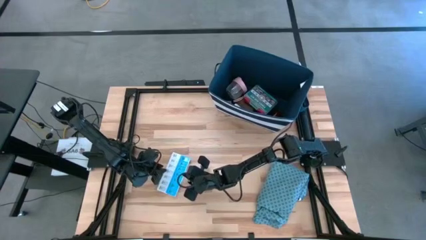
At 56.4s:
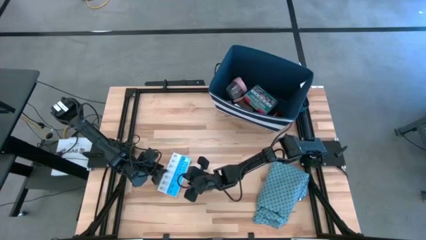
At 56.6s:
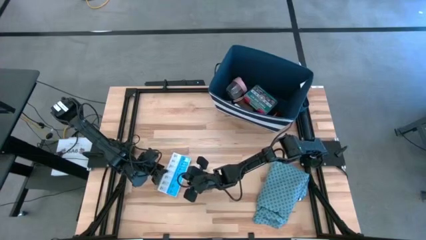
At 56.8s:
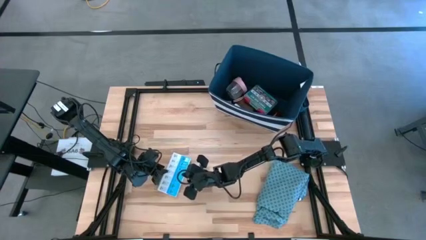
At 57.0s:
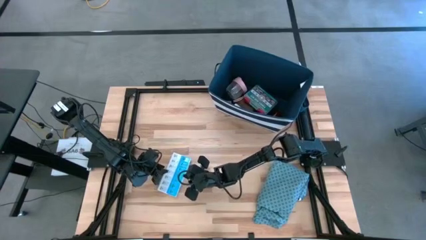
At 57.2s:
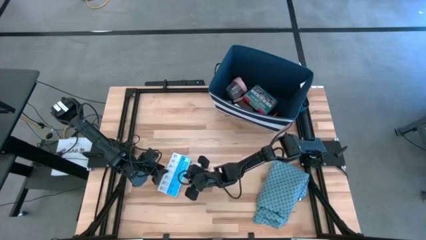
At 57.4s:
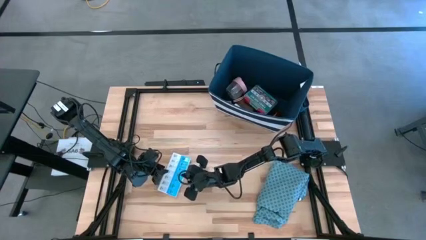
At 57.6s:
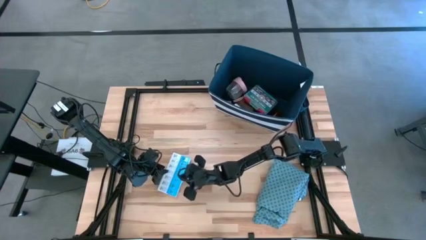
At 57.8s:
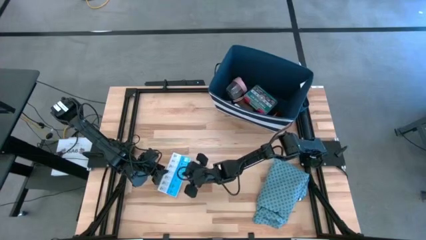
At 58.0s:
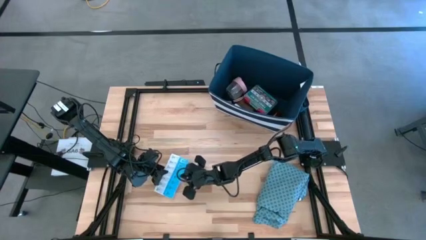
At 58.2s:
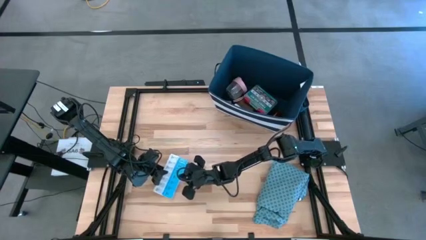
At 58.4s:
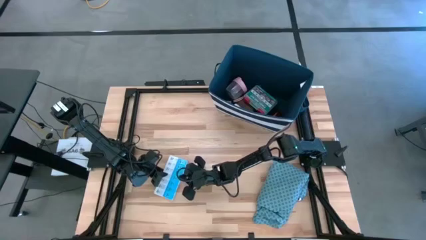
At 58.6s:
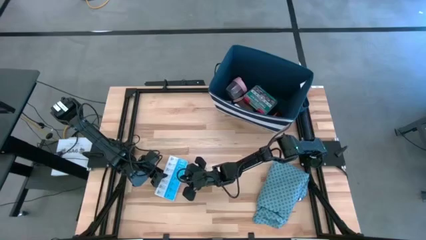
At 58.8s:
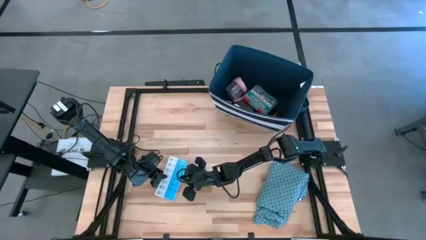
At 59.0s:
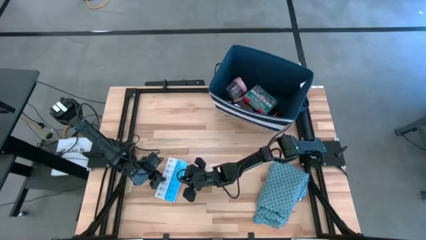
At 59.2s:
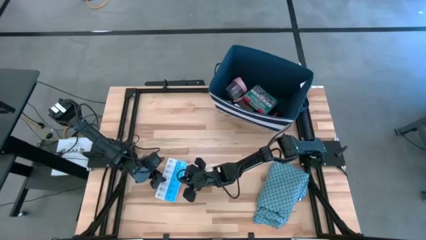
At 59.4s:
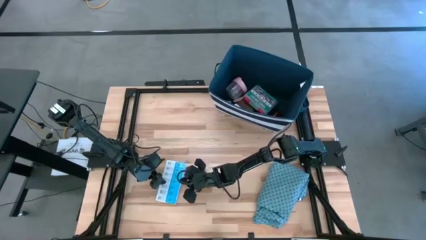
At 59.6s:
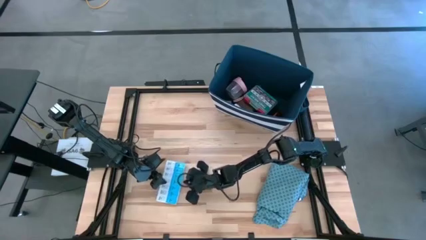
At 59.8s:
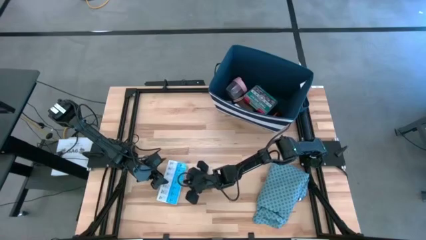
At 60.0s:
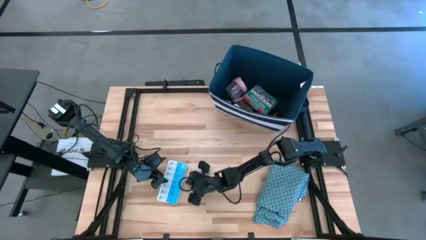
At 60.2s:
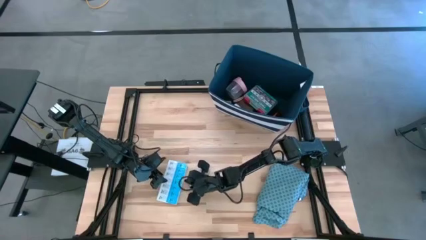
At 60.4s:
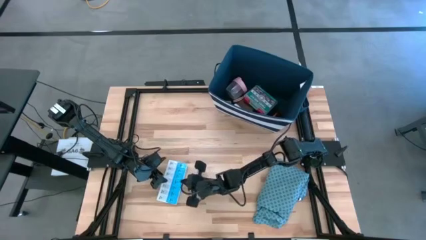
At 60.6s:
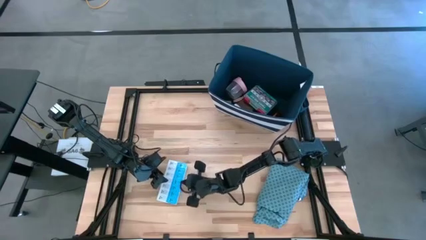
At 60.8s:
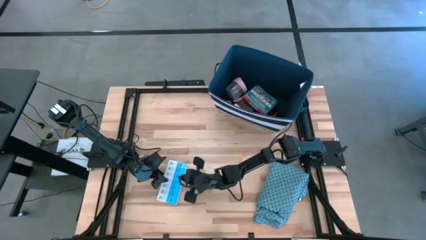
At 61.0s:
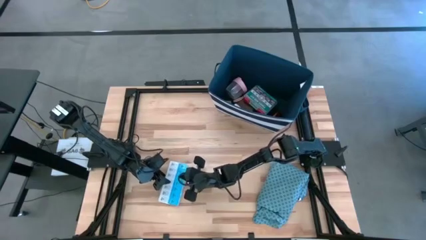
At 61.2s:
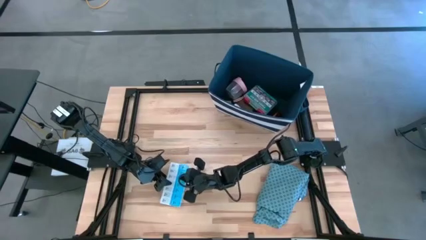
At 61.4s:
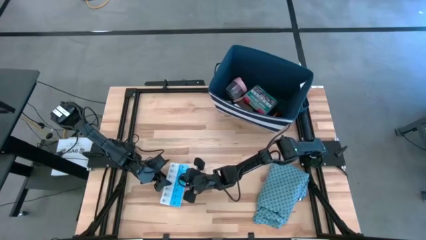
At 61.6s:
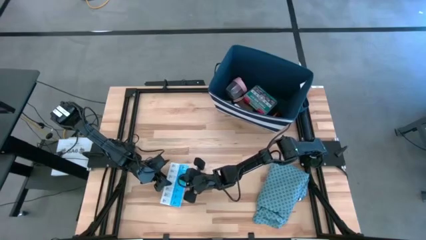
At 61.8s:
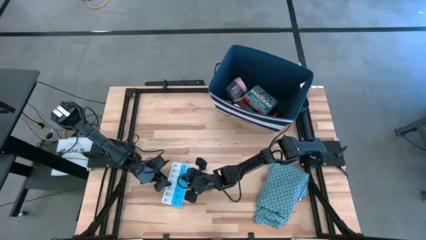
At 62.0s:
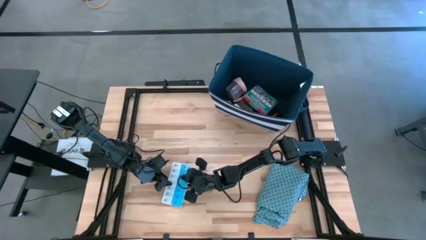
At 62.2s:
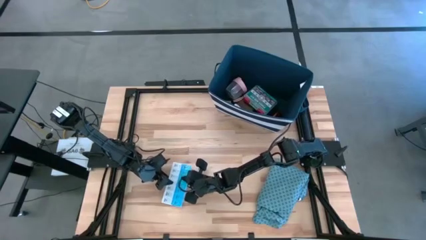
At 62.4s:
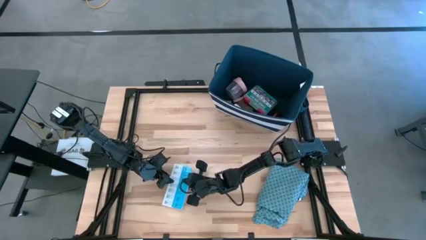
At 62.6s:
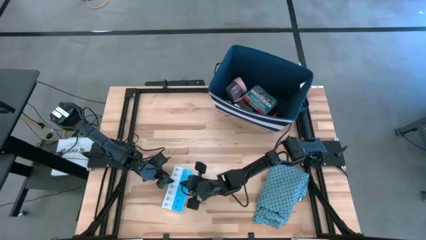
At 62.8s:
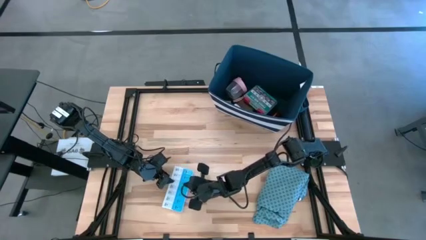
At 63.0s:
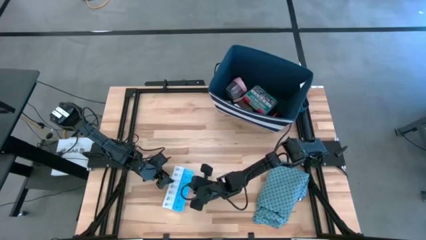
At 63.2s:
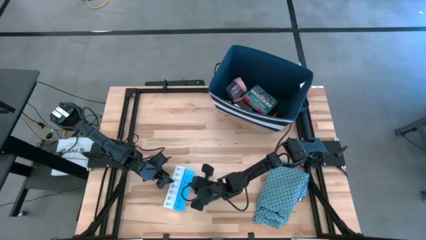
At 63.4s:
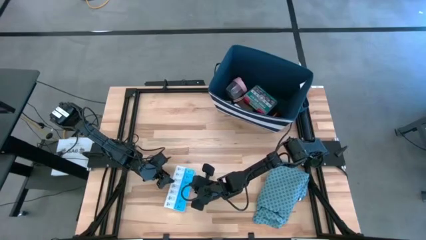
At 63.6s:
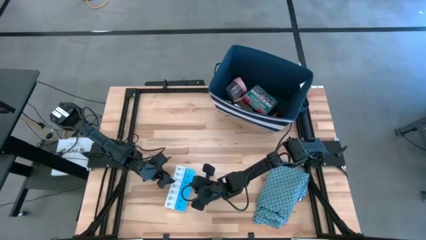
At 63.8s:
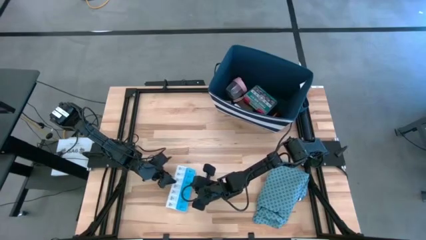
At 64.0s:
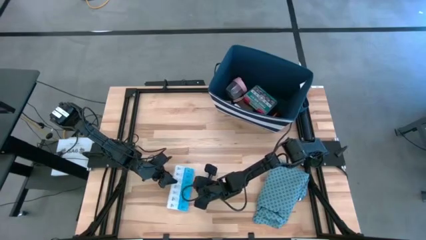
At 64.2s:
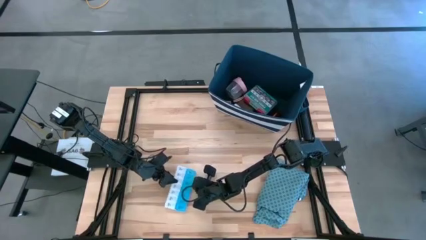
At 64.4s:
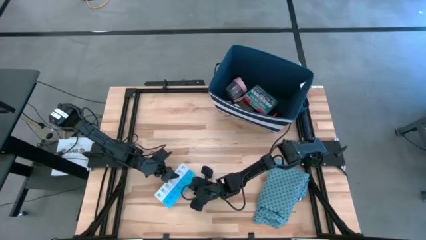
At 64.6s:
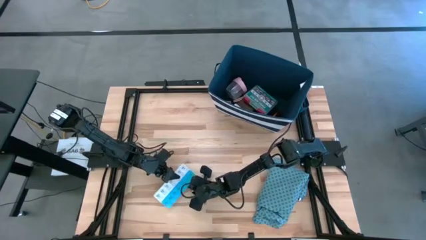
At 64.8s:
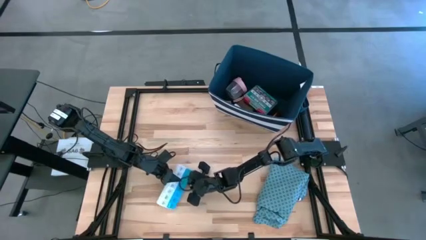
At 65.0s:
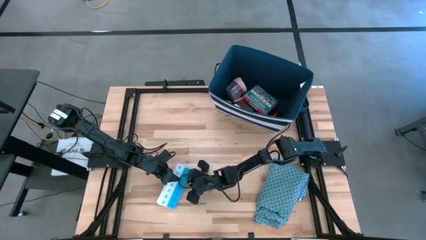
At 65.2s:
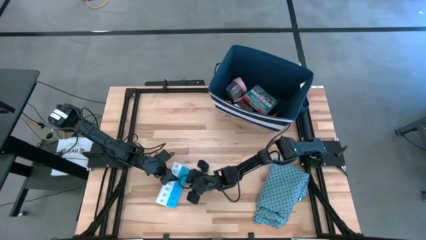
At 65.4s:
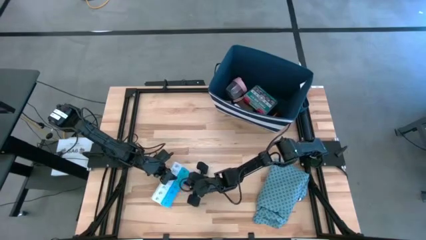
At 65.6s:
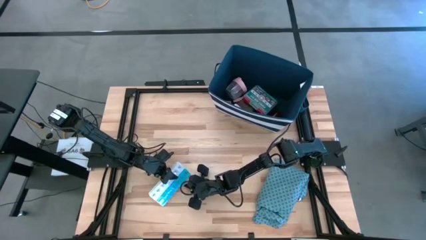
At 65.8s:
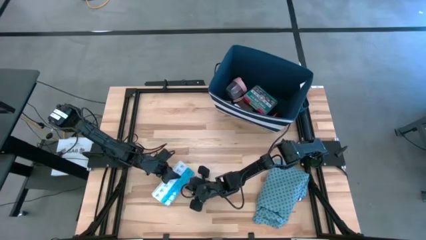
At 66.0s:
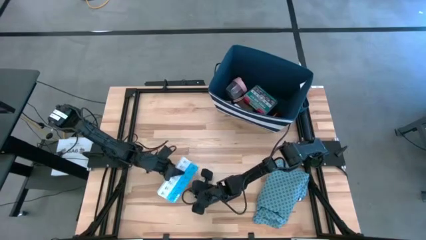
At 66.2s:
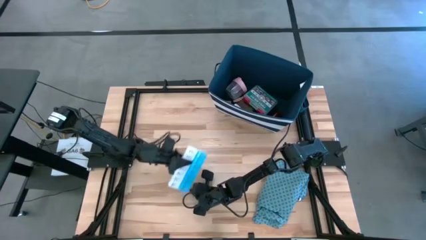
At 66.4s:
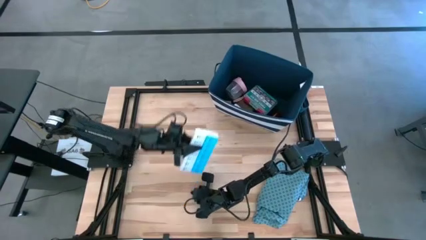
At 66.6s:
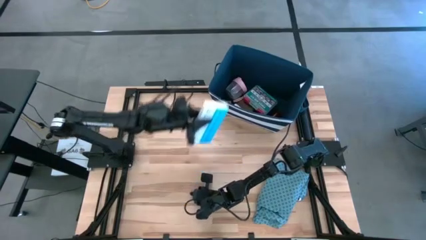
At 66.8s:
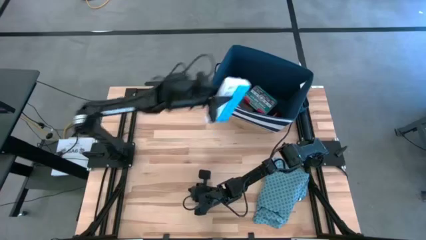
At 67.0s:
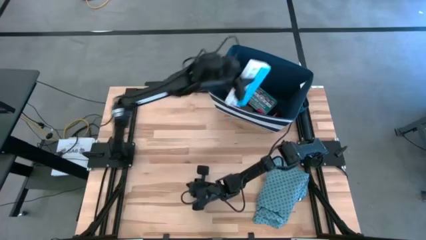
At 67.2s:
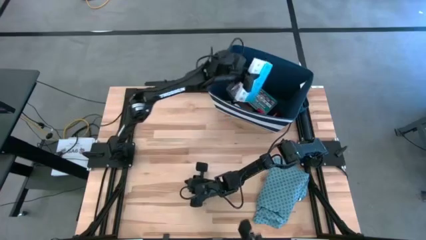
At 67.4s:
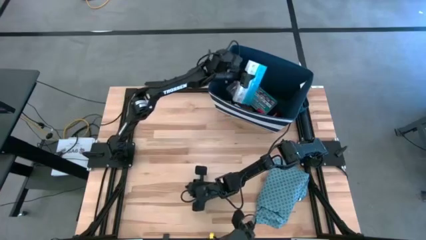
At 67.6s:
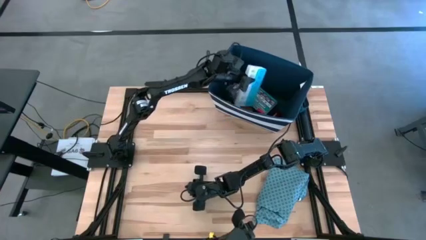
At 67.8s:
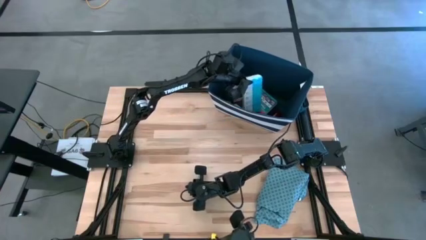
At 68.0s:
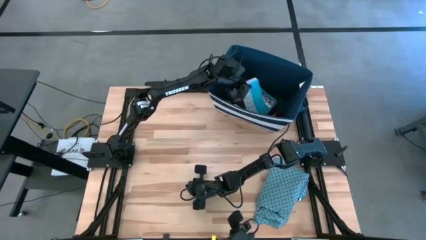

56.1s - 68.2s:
Task: Pick & place medical supplies in basket/bin
Put the white pill organizer into the white bin
